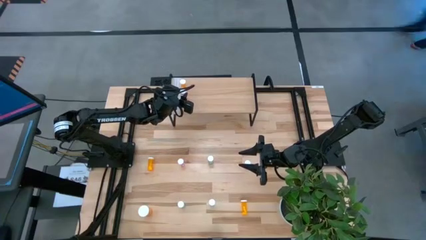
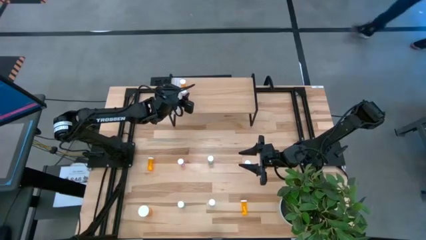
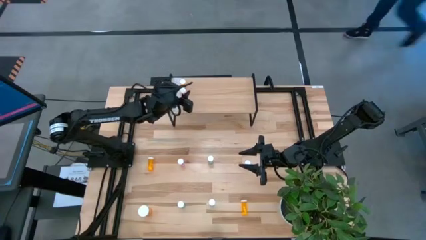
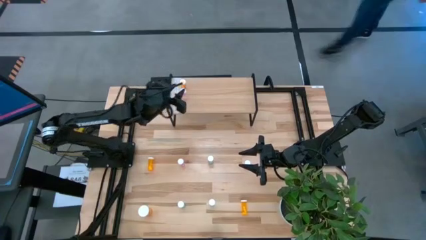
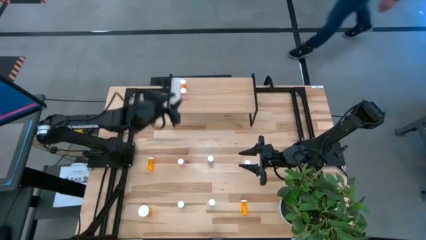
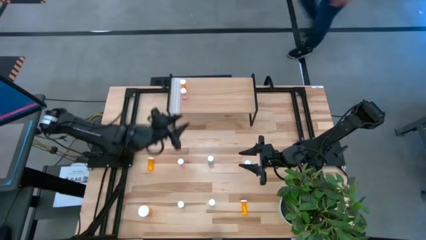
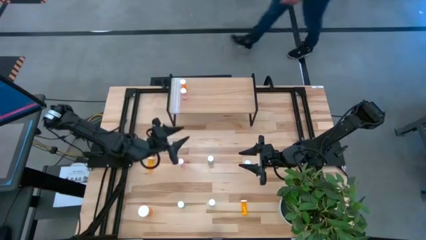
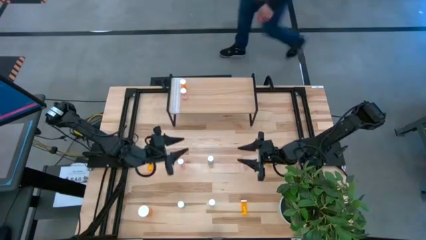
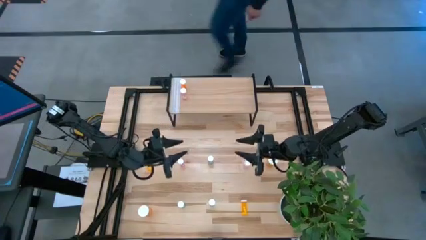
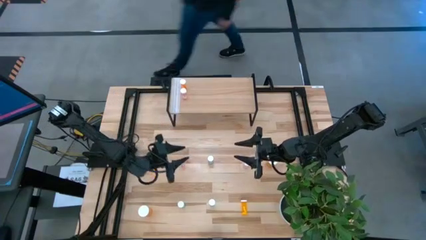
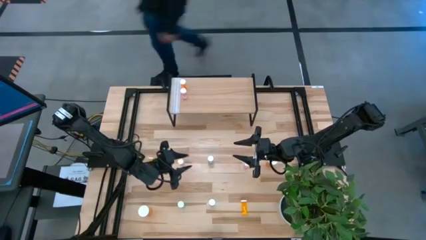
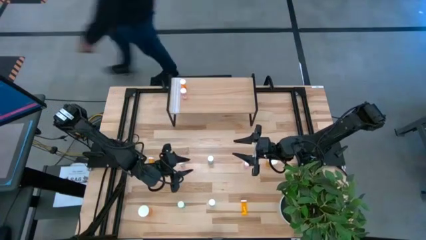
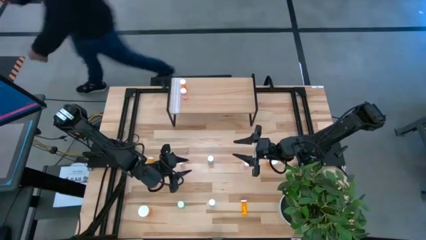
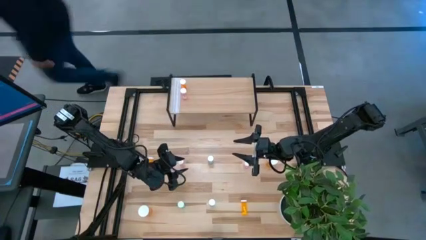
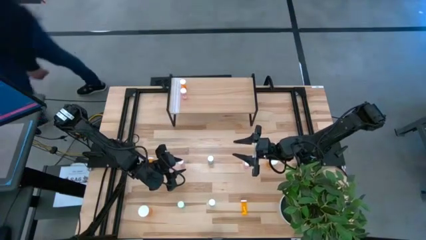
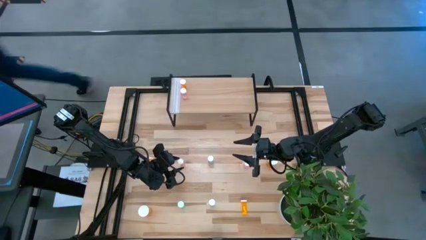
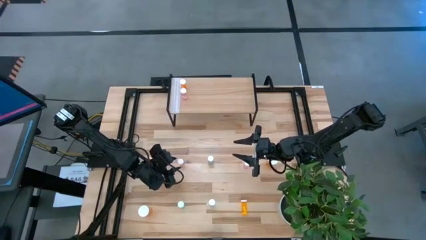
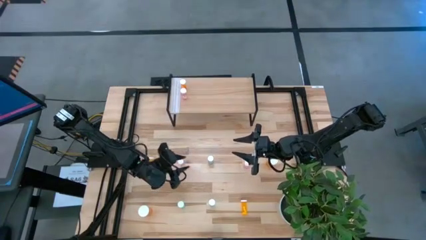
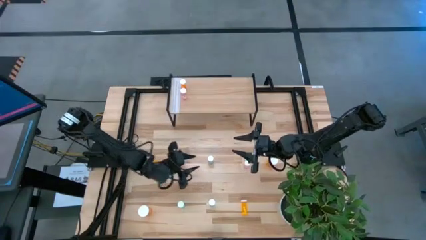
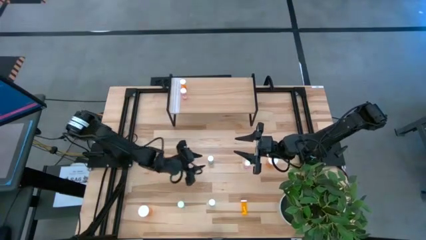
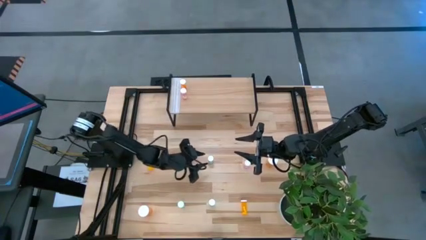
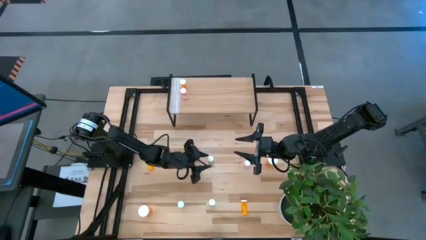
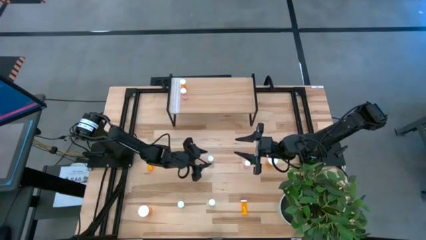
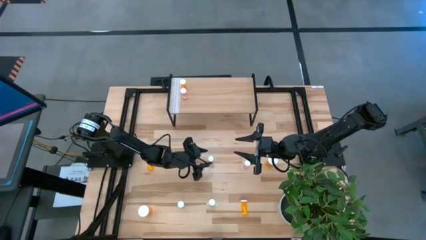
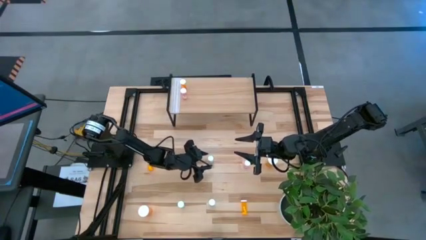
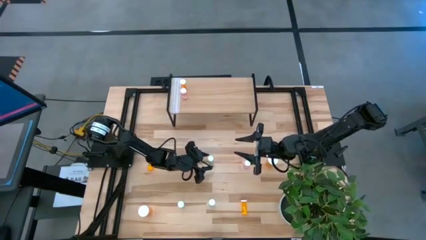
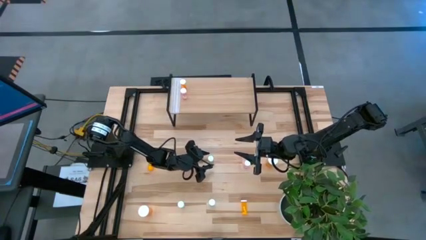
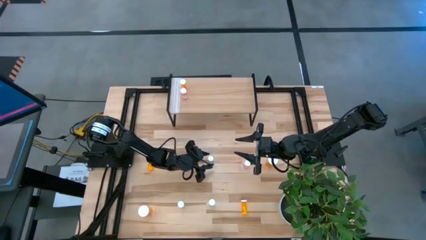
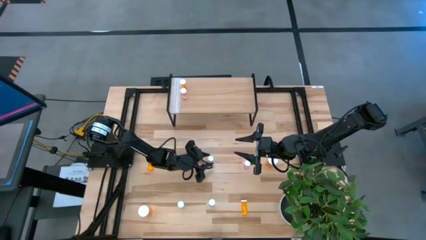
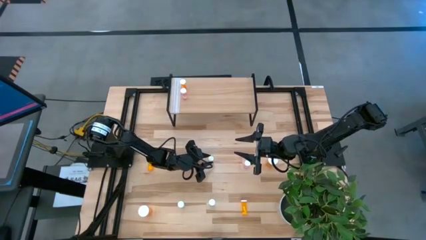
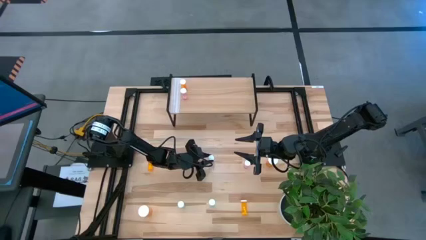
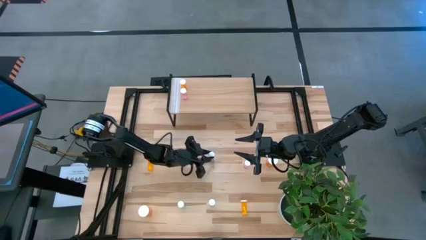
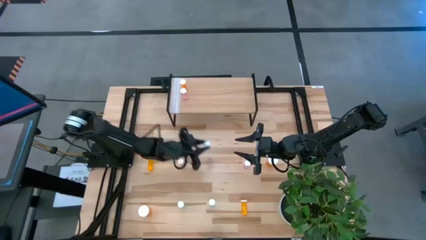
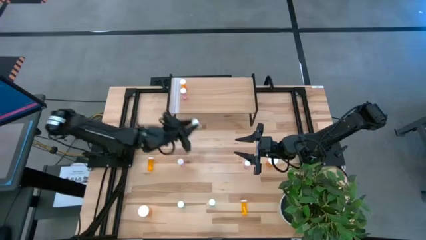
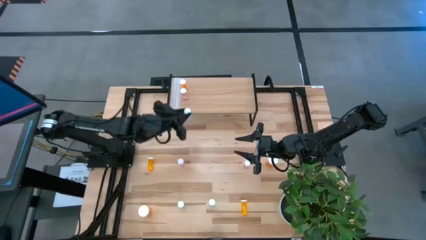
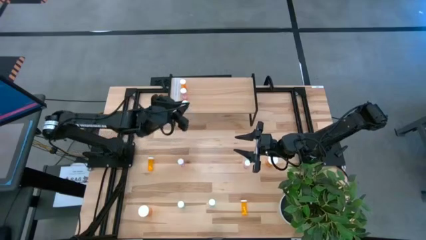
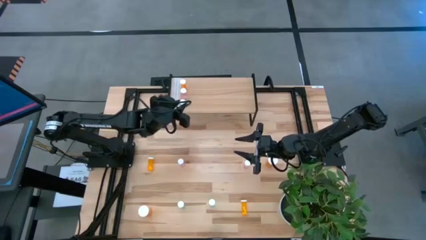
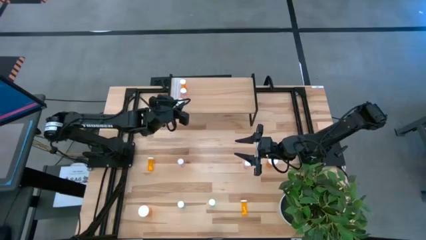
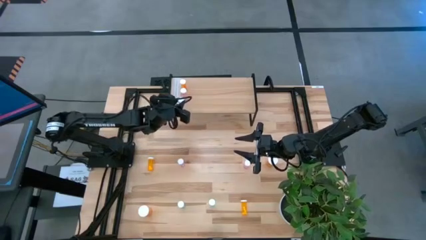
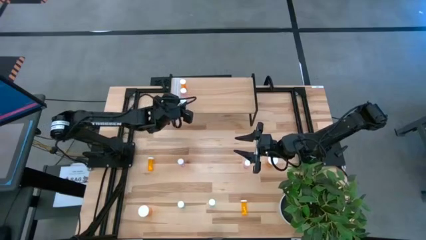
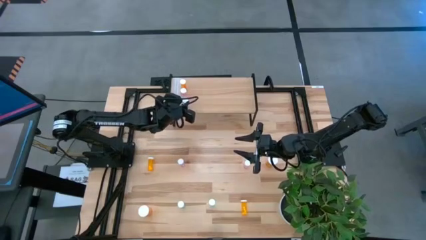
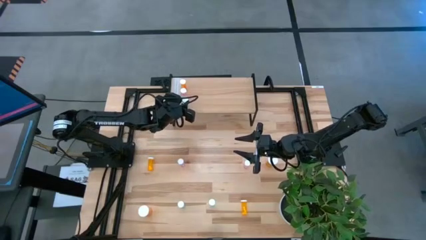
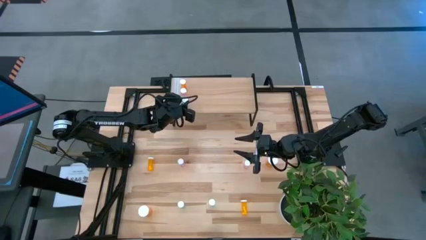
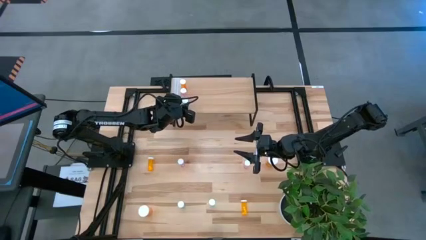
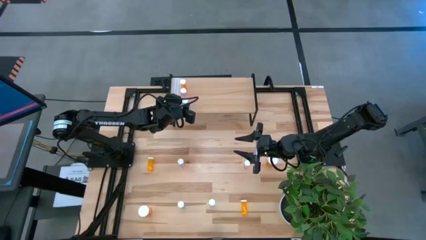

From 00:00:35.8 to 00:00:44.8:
Task: Pick and place medicine bottles onto shelf by color
Put the top blue pill bottle on the shelf

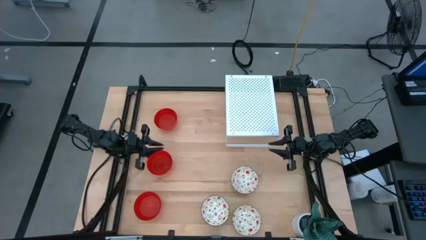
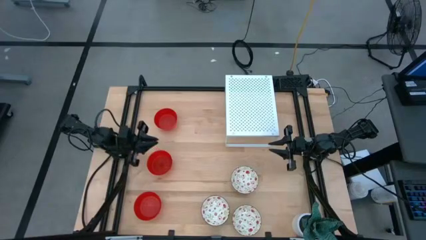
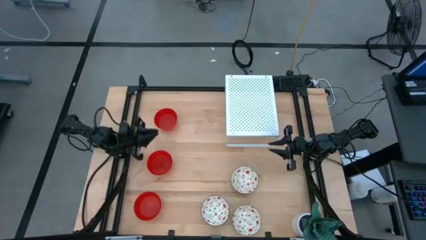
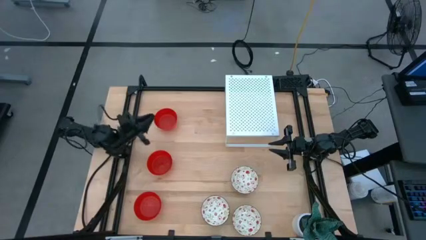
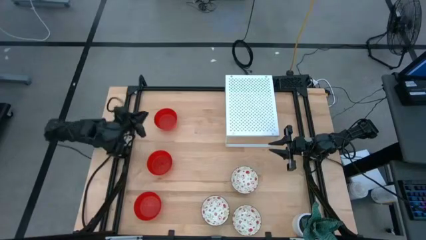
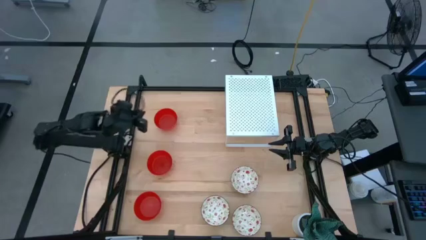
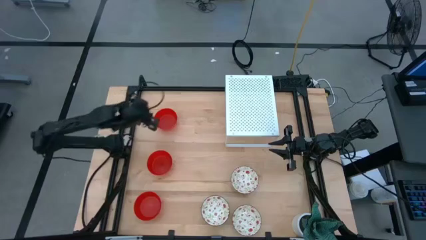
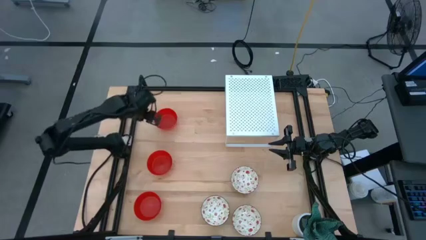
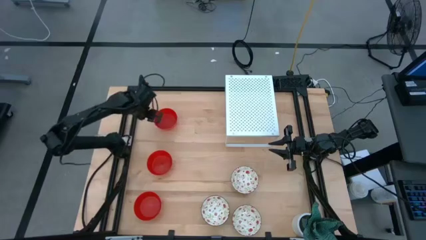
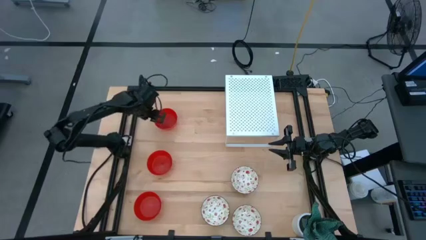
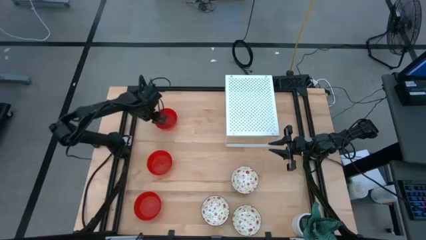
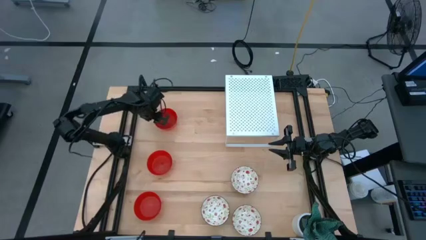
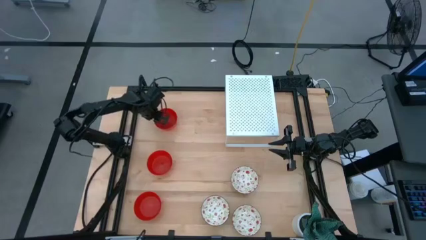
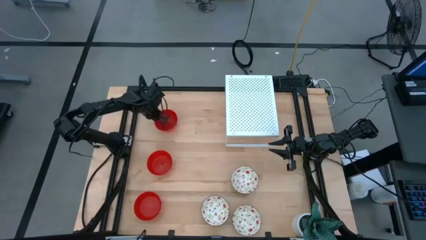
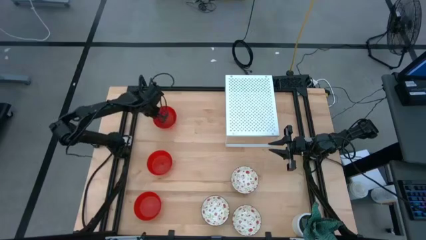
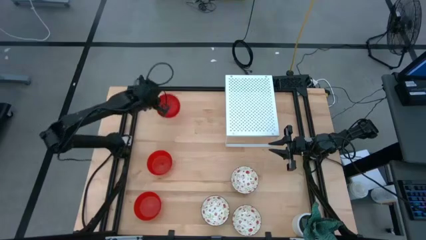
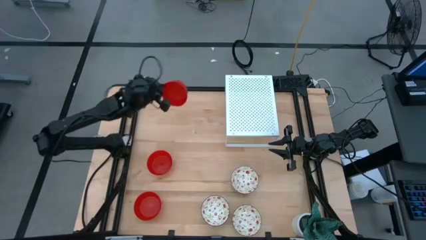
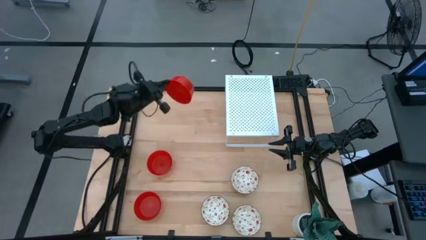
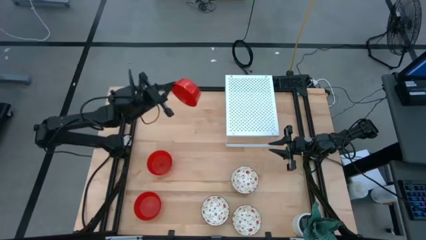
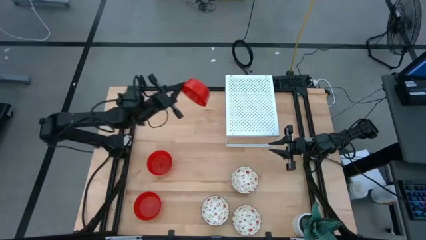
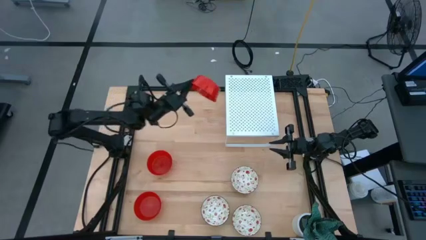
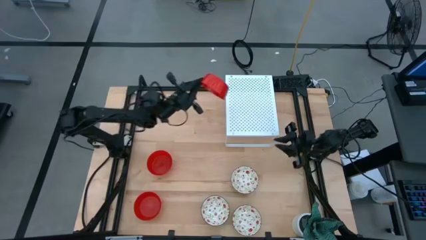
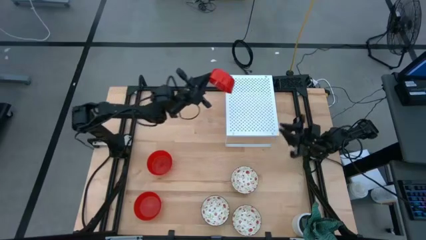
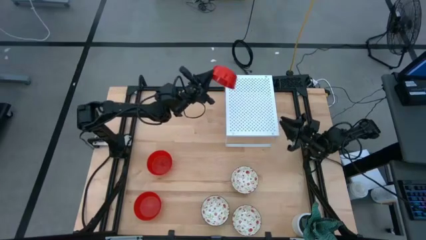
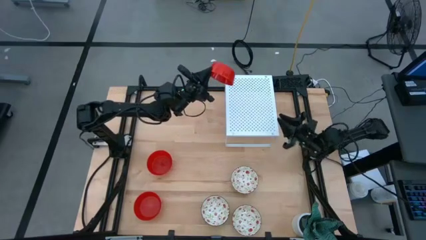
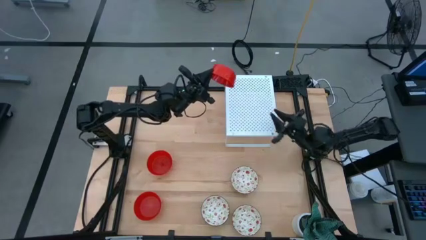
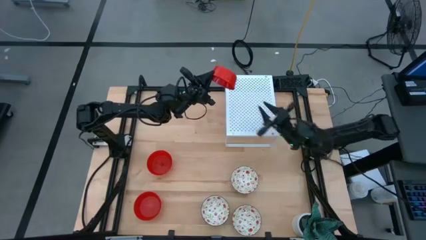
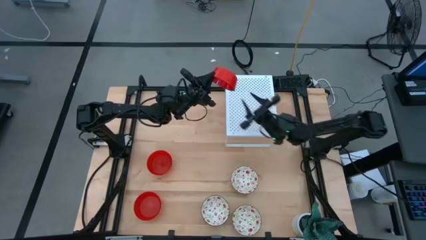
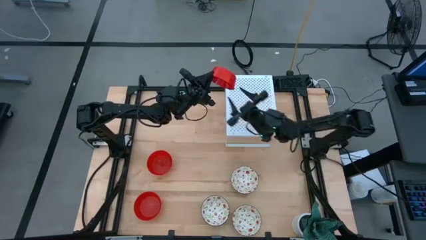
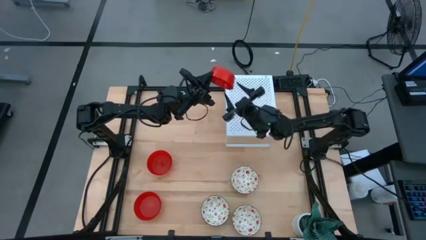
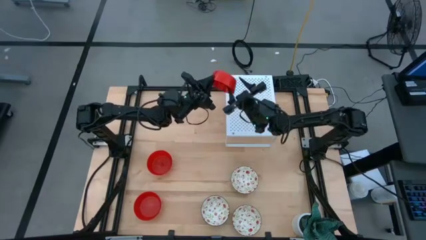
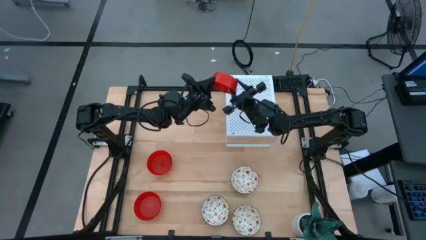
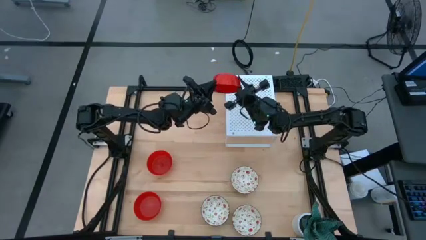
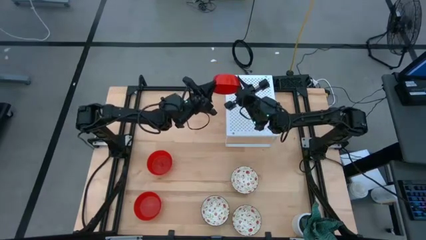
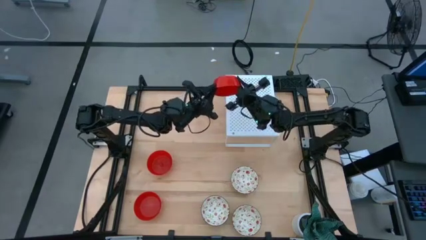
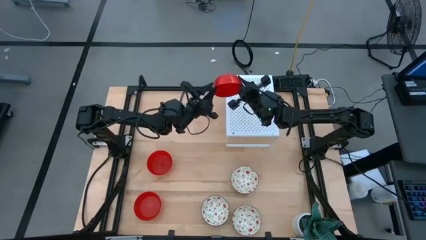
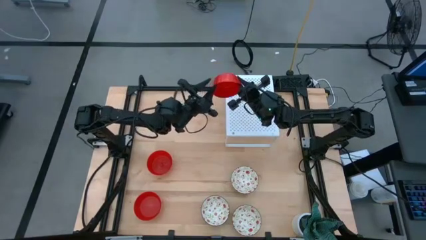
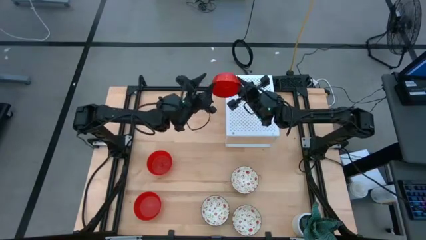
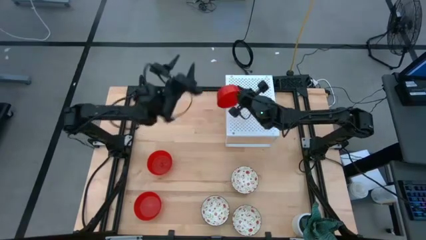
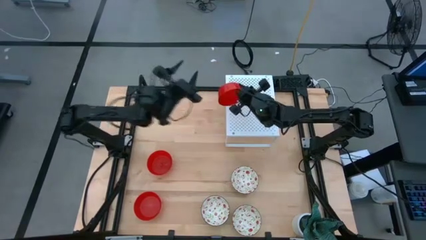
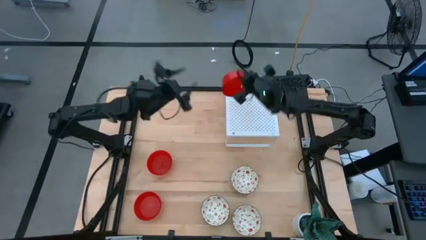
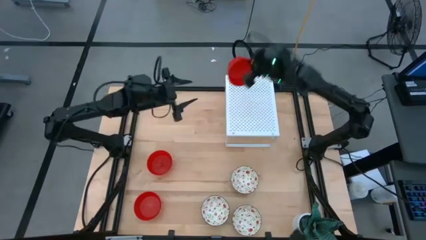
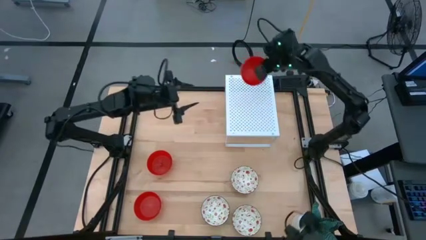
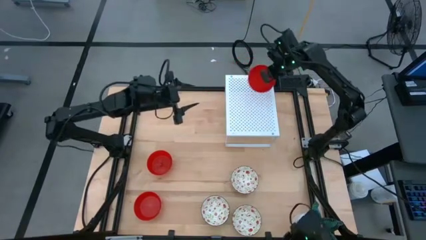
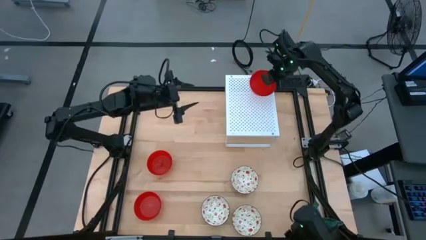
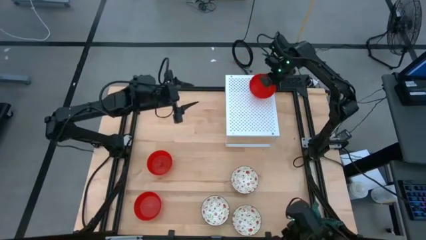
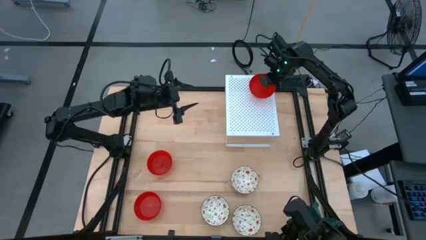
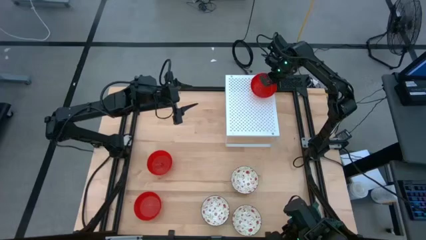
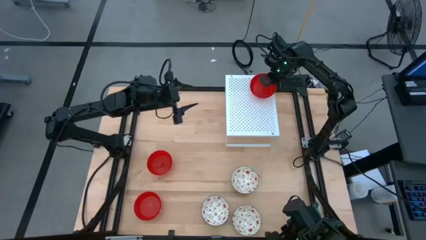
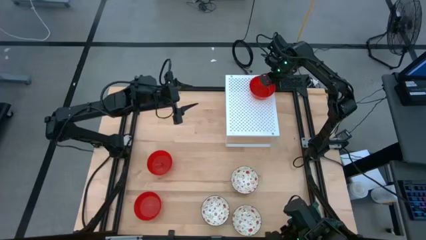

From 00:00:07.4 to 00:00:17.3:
Task: Pick & Place Mini bowls
Put the top red bowl on the shelf
